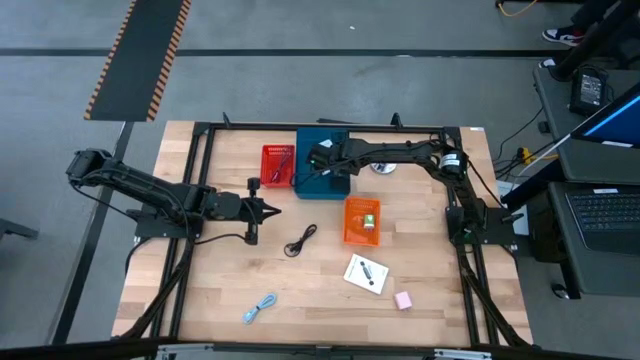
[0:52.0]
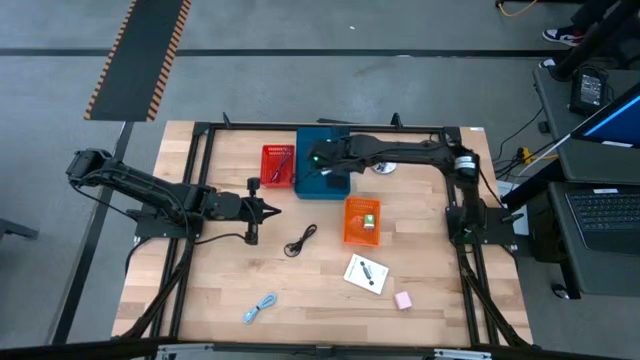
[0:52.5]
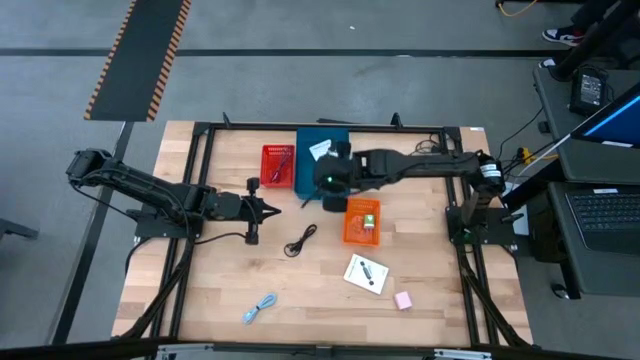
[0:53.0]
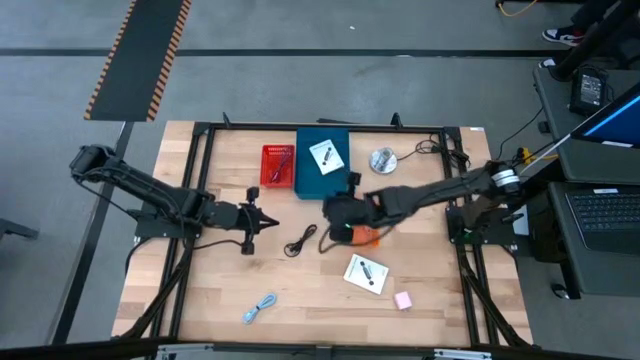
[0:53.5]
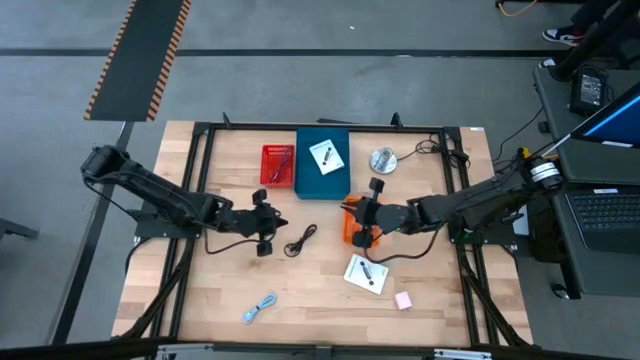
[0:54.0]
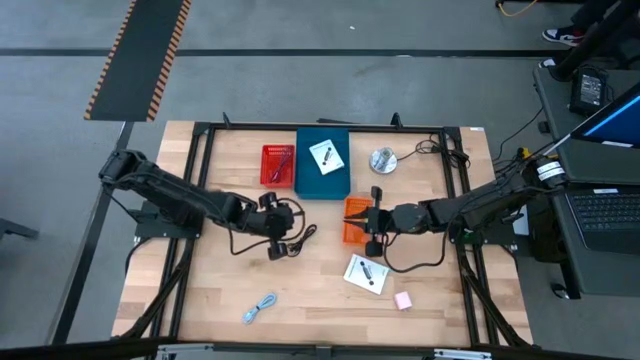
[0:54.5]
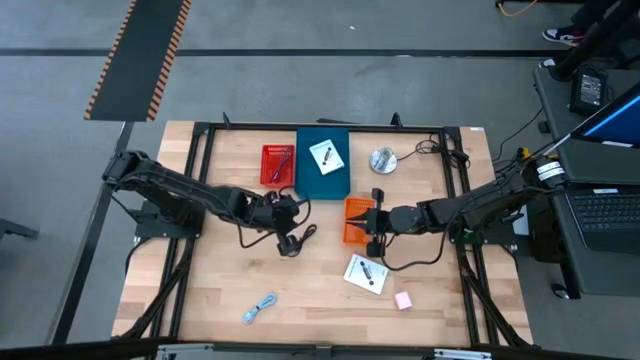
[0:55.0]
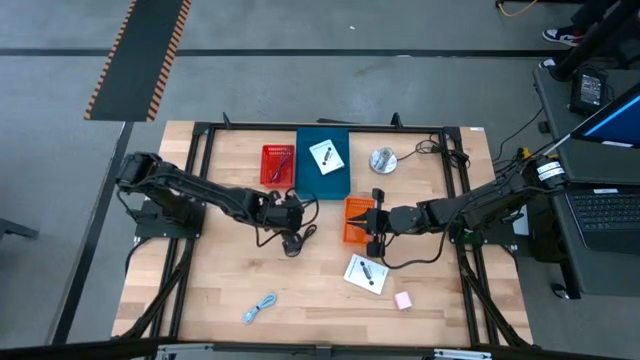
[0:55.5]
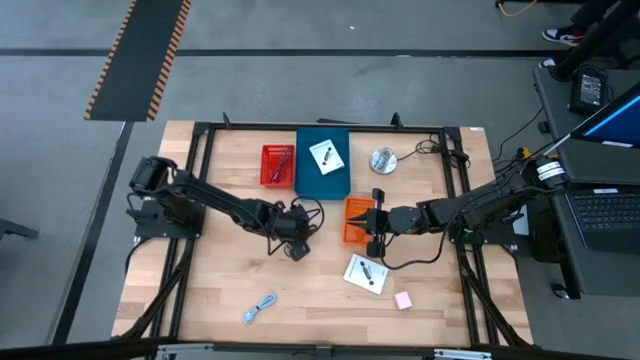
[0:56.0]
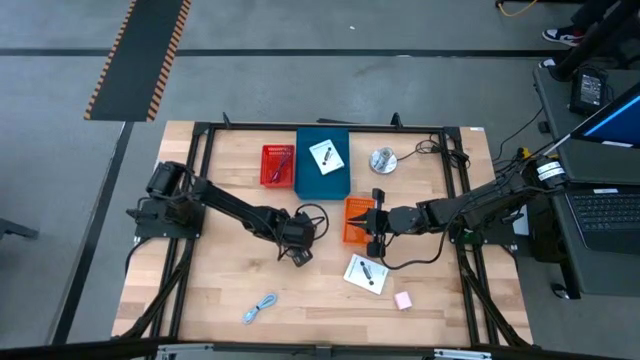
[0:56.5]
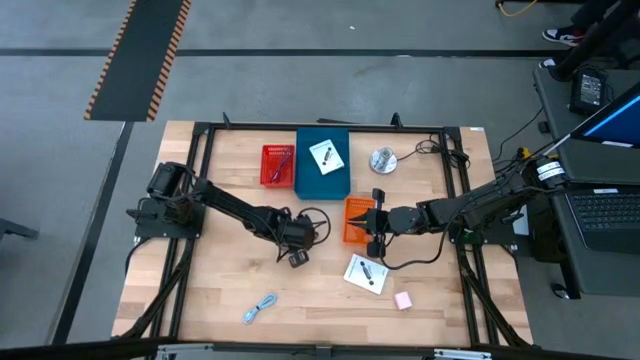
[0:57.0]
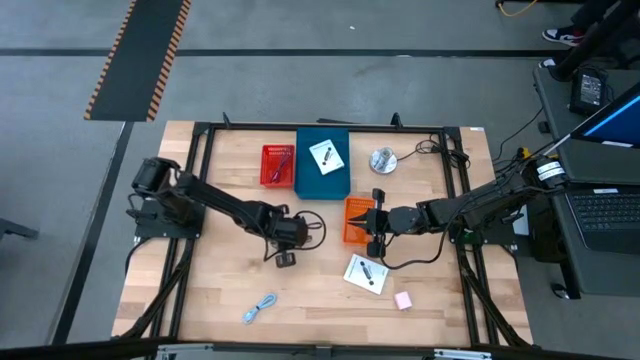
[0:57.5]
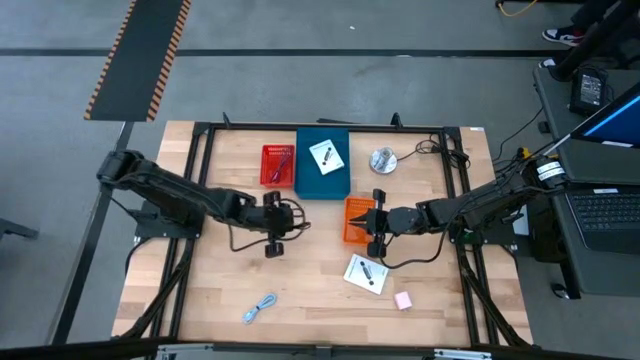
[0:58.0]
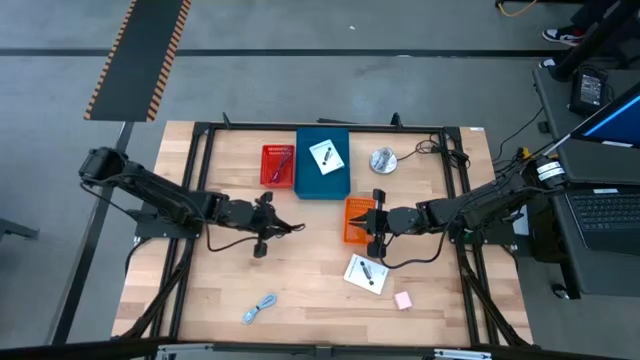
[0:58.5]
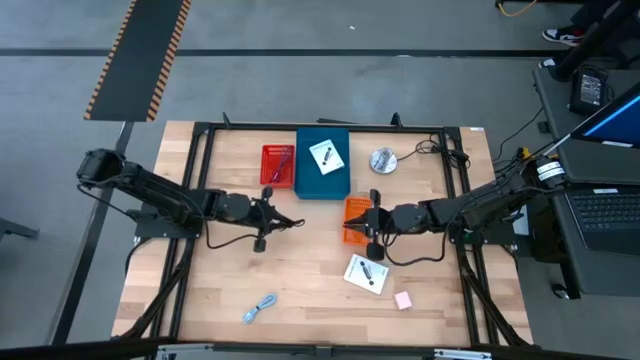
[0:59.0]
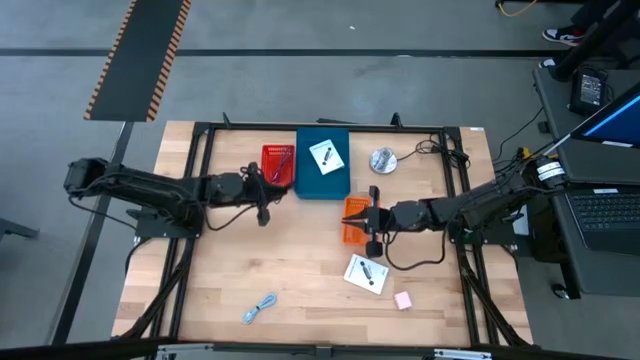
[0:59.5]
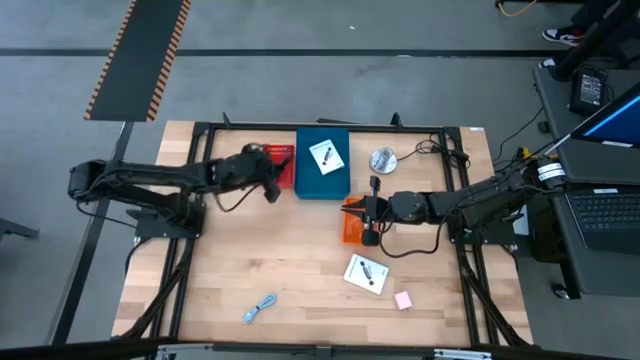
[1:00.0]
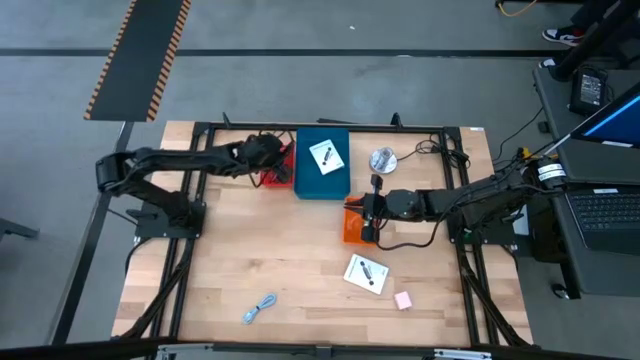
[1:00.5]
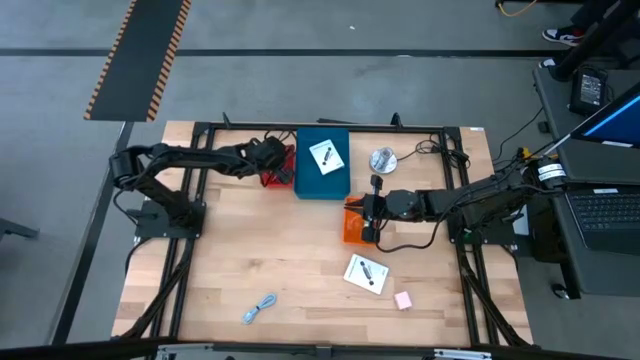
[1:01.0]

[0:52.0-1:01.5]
Task: Pick and place items into bin
Put the black charger cable into the red bin

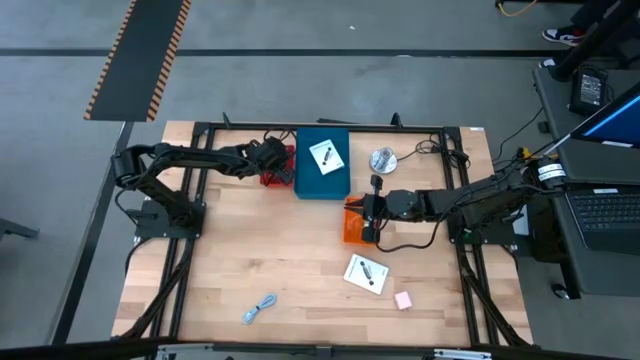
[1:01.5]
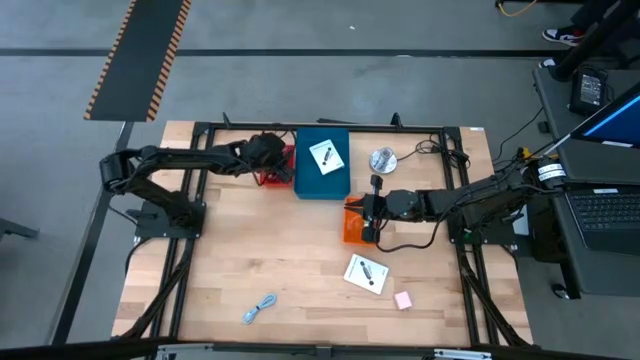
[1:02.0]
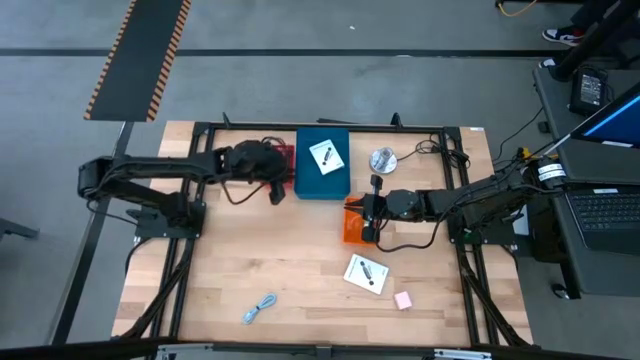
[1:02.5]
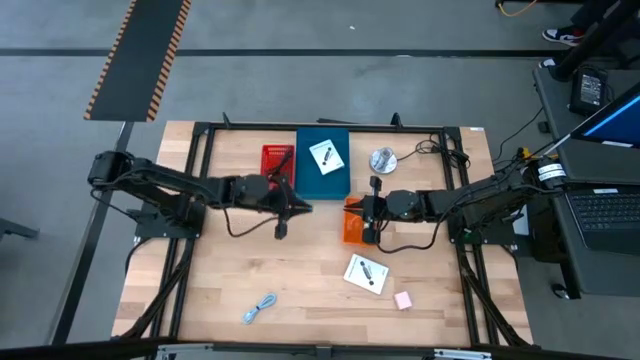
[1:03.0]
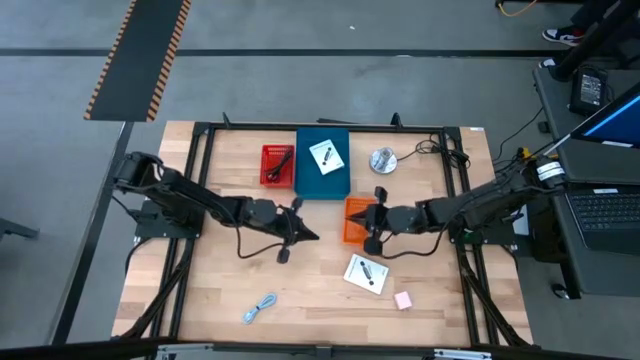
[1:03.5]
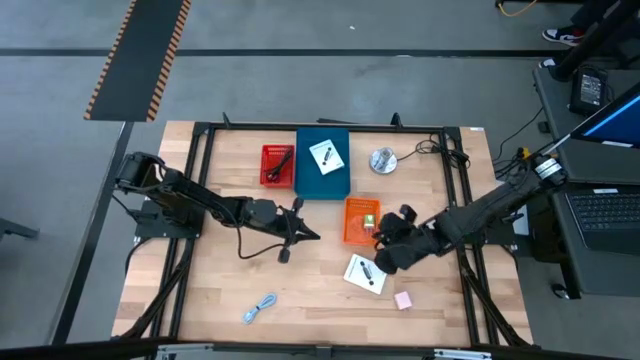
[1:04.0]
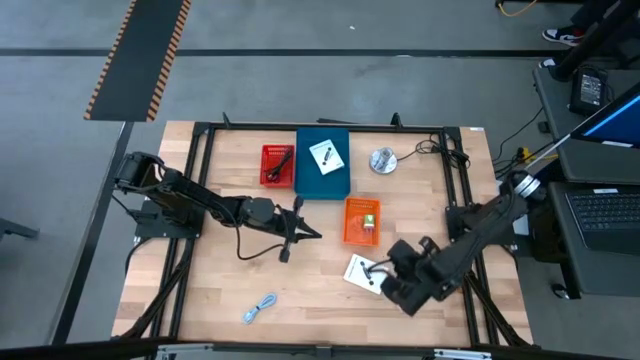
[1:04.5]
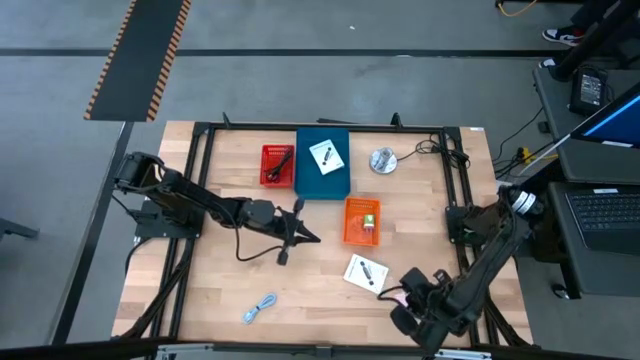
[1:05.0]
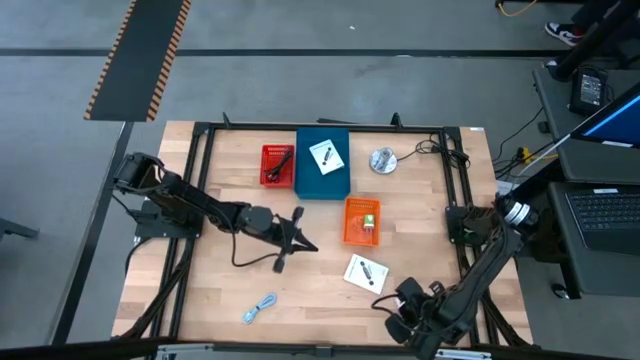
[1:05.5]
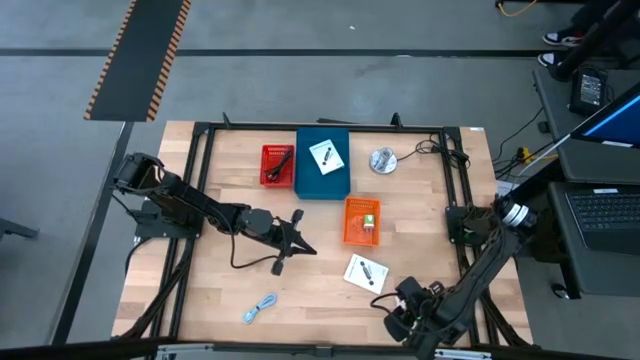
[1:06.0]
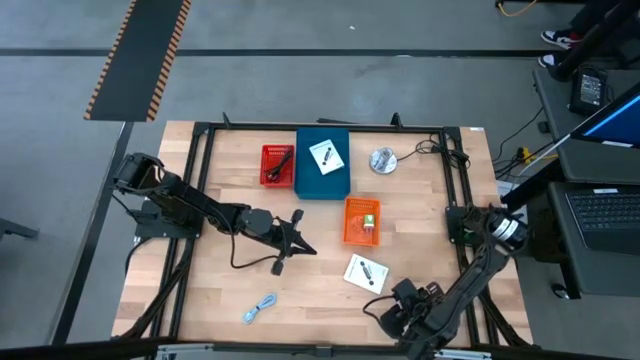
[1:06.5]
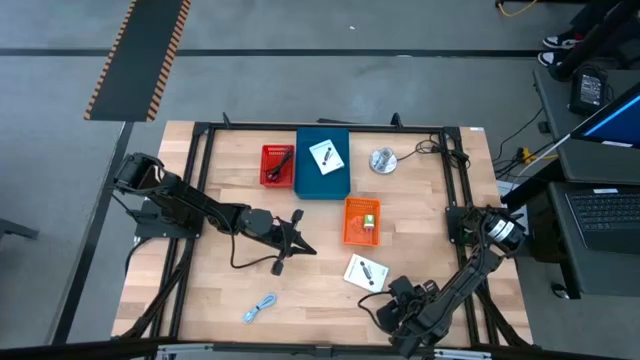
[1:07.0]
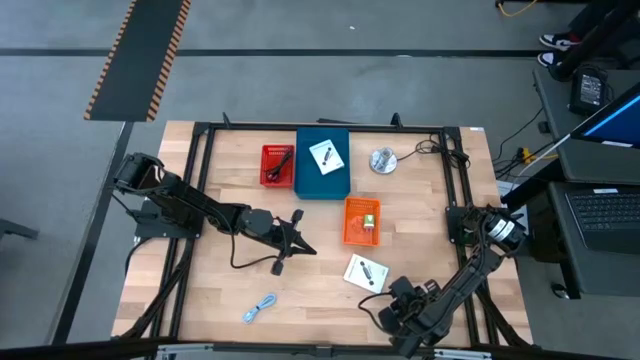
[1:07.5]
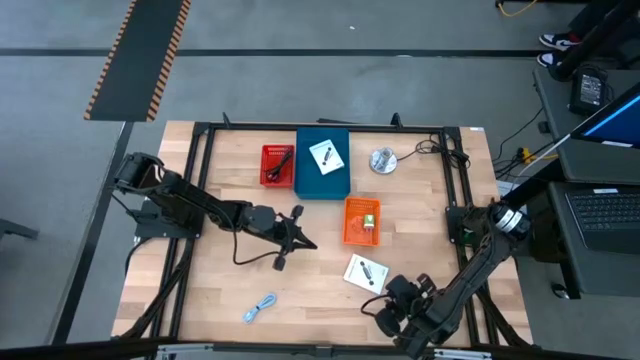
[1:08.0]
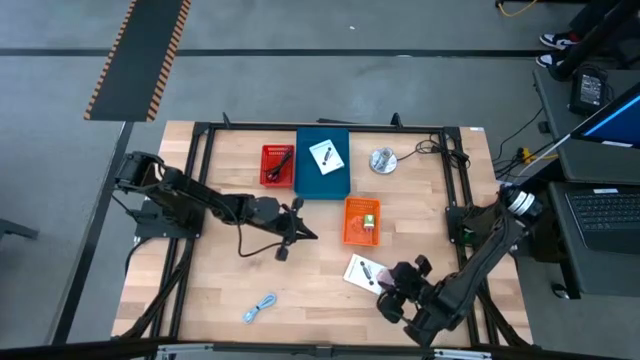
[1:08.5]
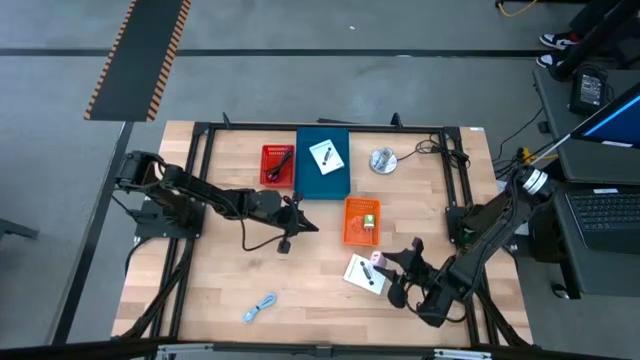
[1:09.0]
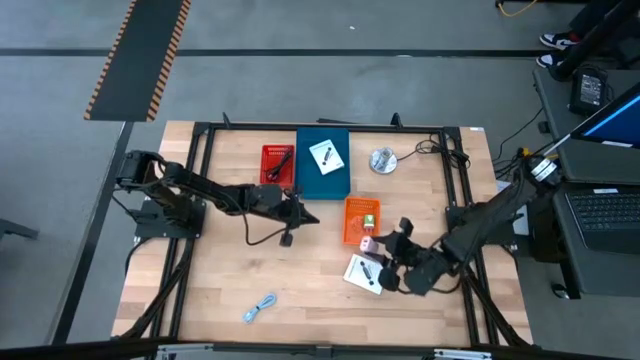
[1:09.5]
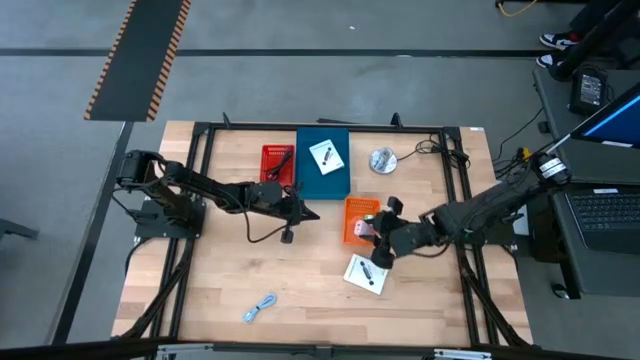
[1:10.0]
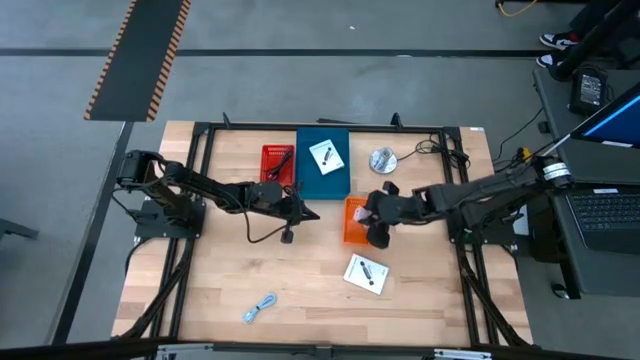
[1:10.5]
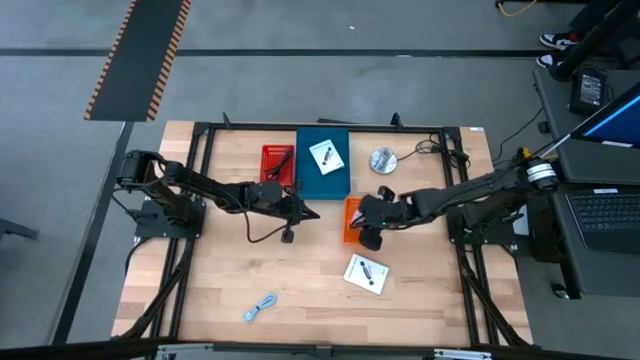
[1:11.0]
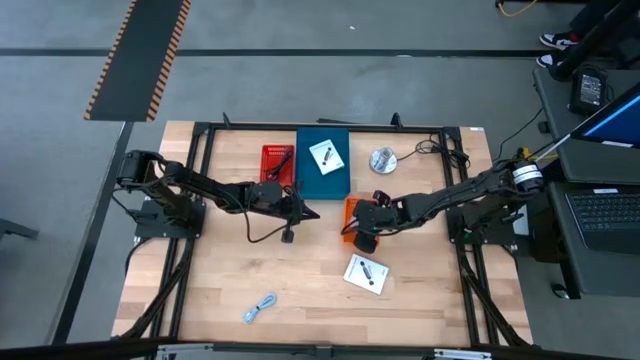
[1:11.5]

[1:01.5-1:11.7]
Put the light pink charger adapter into the orange bin
